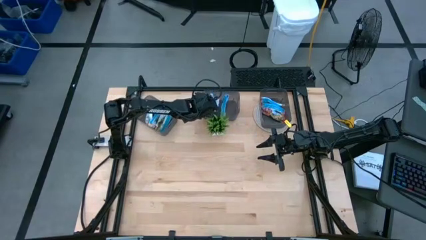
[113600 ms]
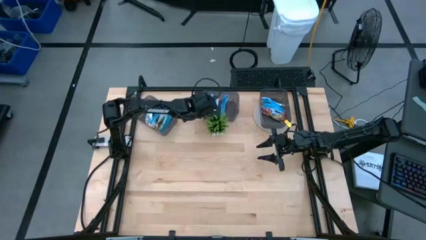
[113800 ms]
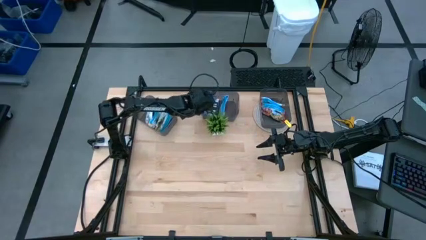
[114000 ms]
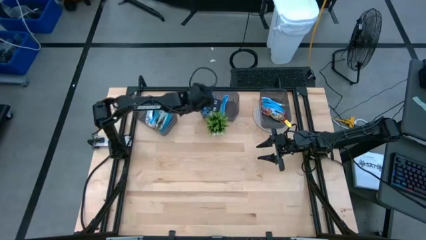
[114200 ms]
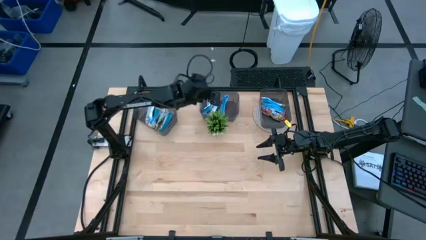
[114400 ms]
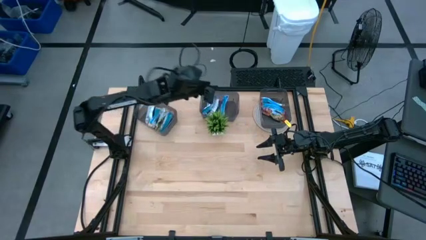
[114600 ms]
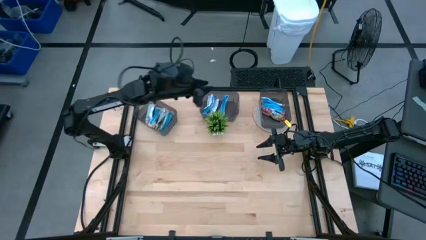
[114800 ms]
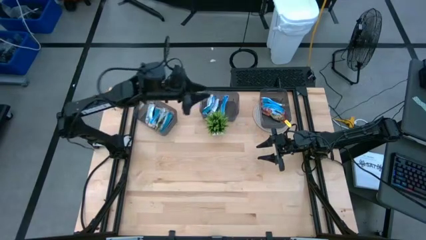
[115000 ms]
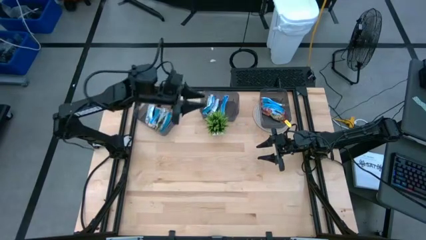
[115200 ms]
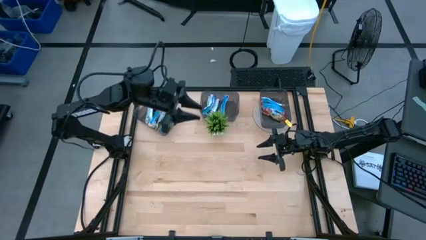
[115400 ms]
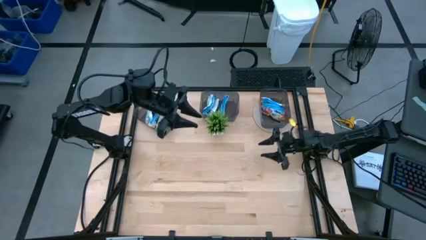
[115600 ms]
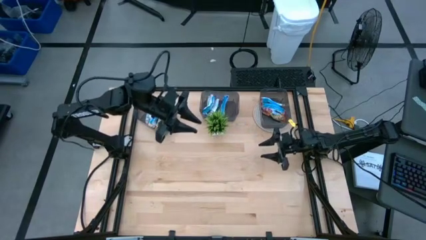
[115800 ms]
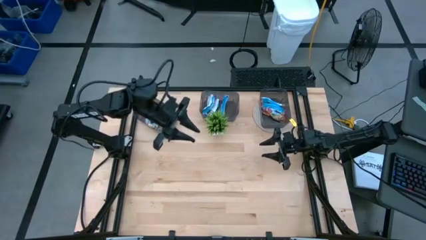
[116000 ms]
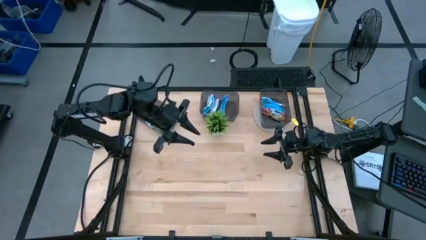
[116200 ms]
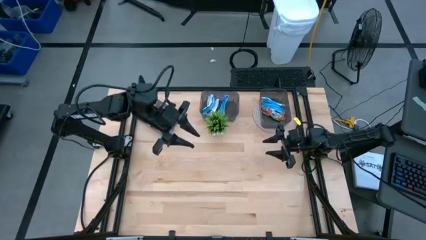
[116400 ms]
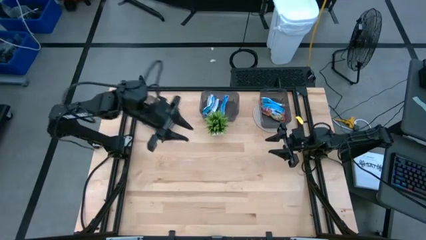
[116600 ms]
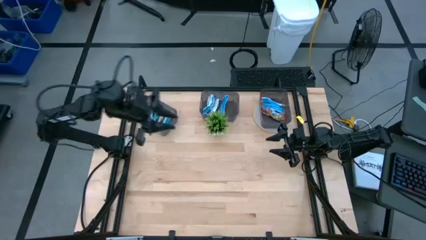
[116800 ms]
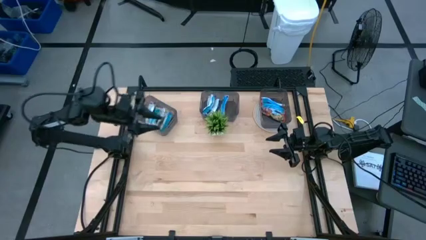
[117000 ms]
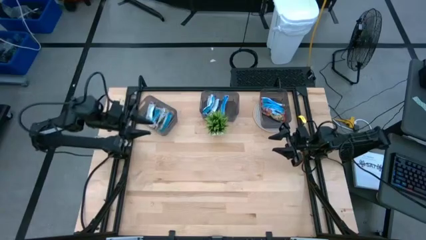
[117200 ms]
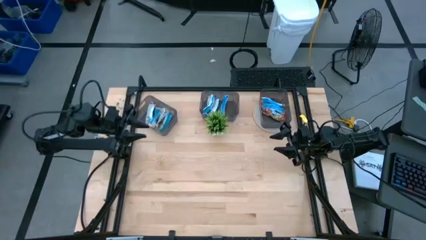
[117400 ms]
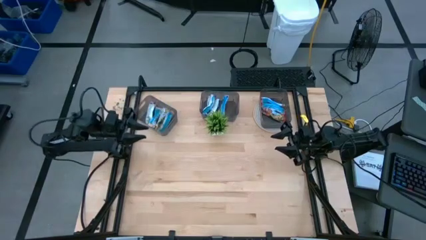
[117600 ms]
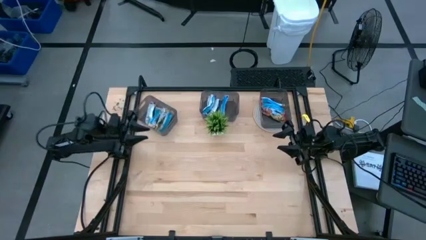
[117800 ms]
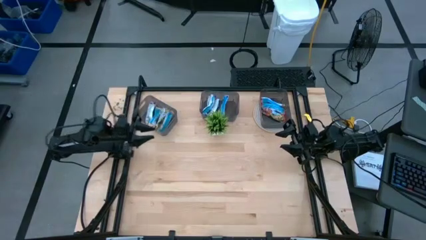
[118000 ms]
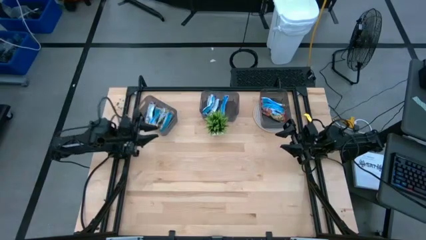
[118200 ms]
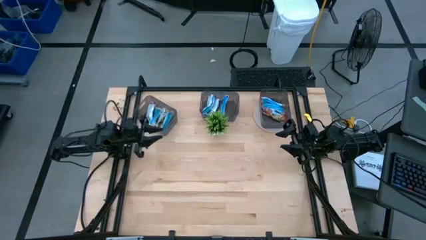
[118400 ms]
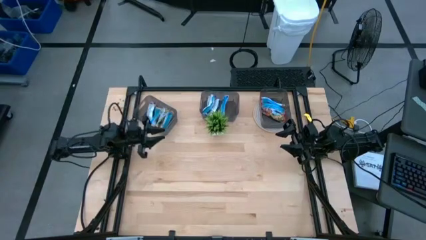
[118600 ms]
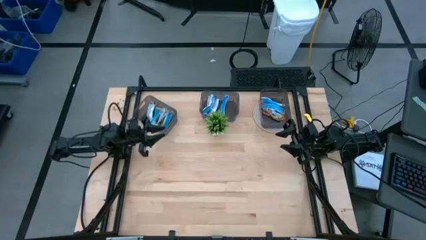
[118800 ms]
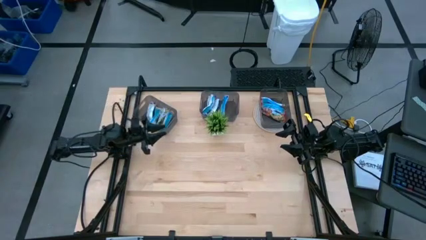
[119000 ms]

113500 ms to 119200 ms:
Task: Pick and place Granola Bars by type
Return to Home Position

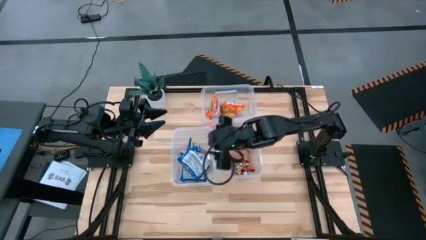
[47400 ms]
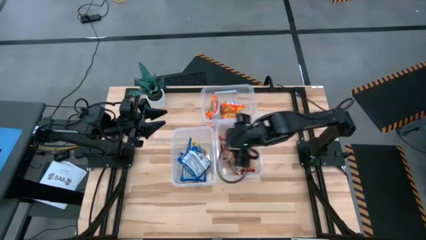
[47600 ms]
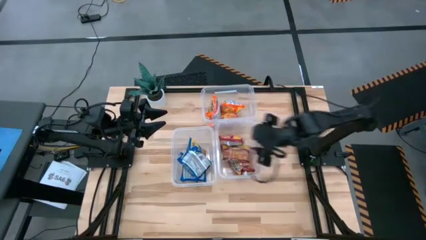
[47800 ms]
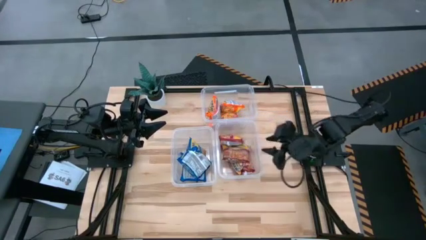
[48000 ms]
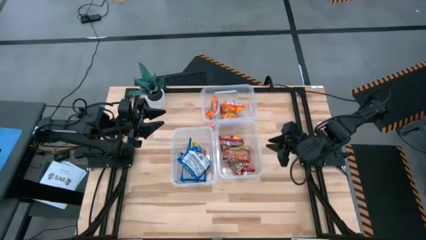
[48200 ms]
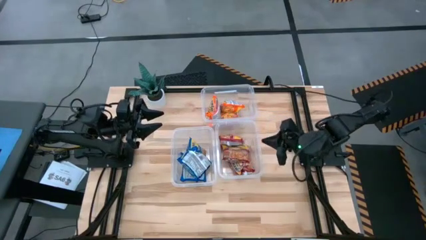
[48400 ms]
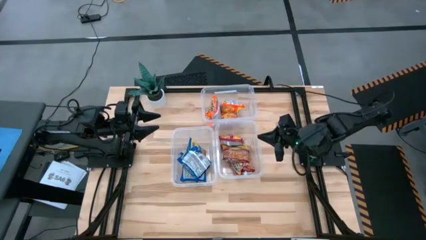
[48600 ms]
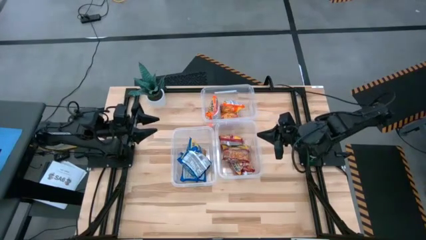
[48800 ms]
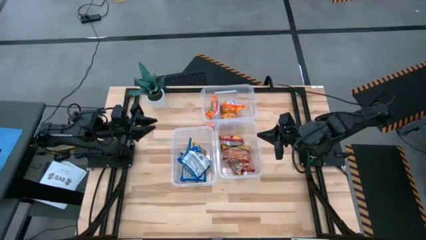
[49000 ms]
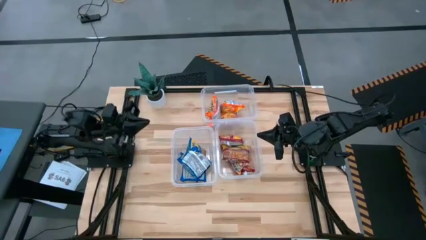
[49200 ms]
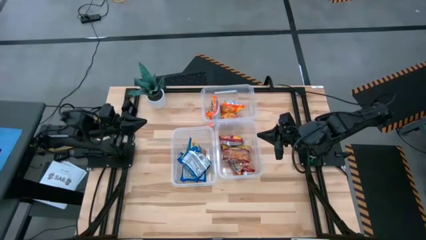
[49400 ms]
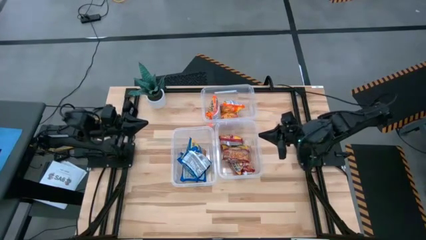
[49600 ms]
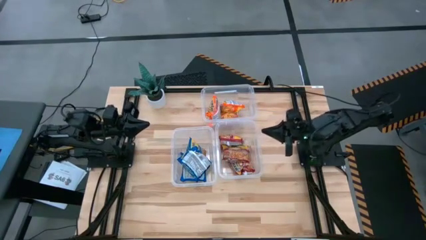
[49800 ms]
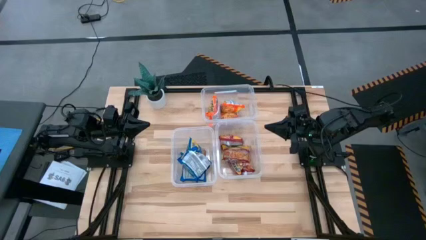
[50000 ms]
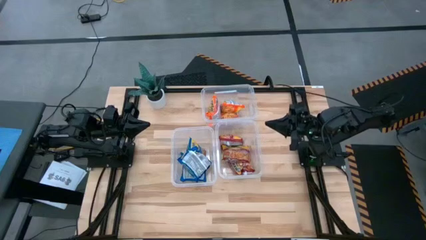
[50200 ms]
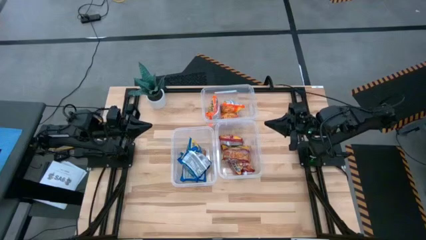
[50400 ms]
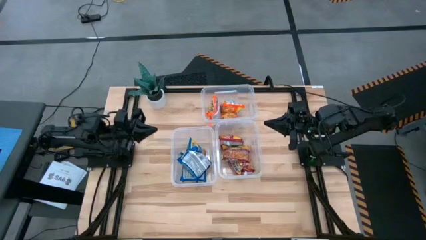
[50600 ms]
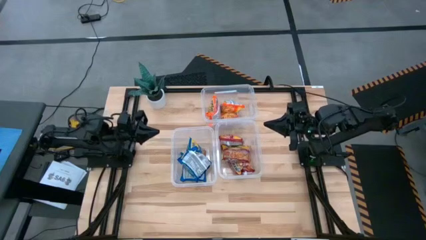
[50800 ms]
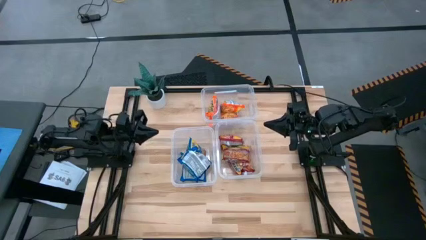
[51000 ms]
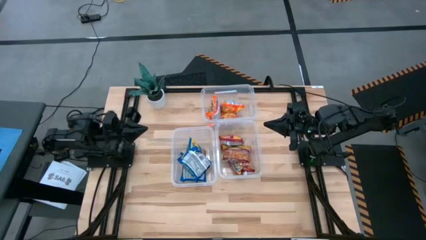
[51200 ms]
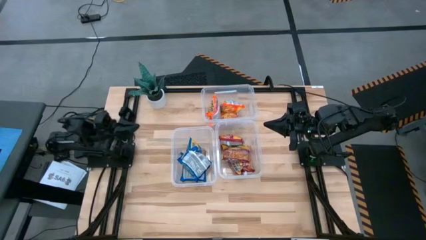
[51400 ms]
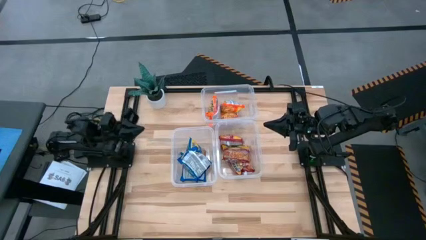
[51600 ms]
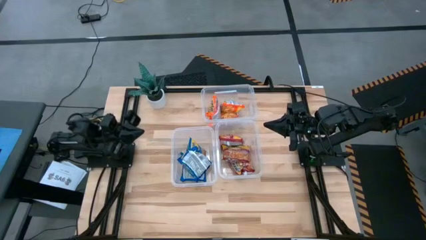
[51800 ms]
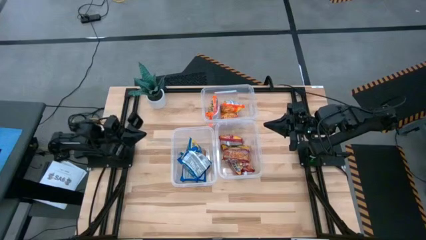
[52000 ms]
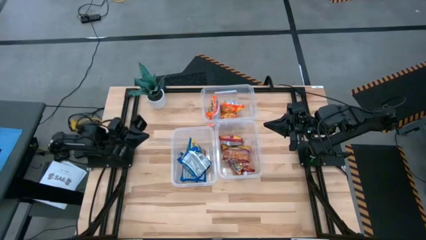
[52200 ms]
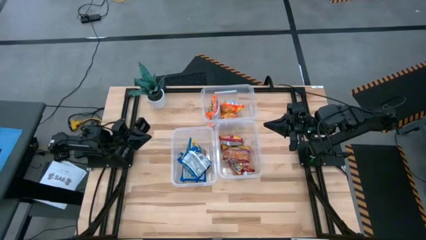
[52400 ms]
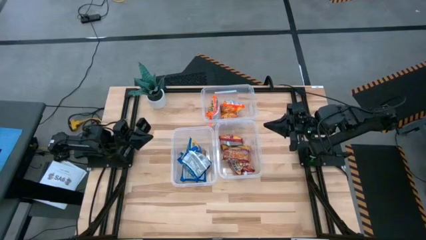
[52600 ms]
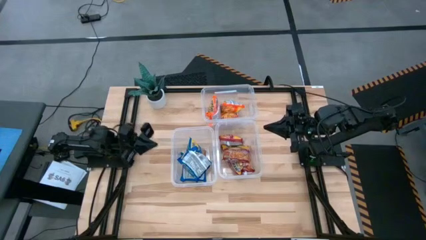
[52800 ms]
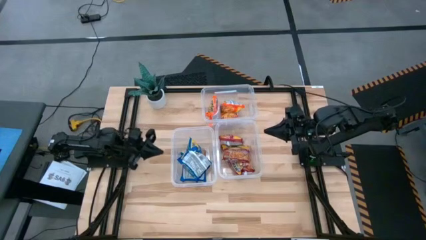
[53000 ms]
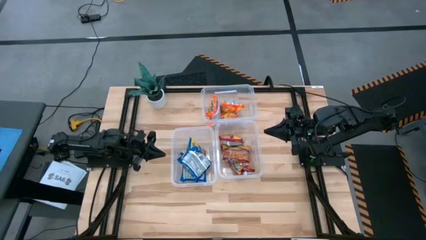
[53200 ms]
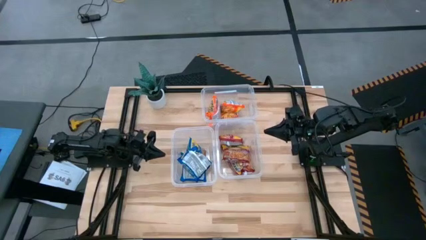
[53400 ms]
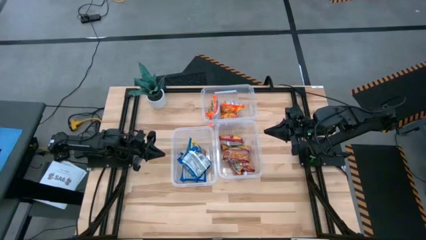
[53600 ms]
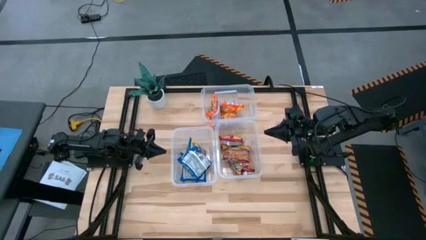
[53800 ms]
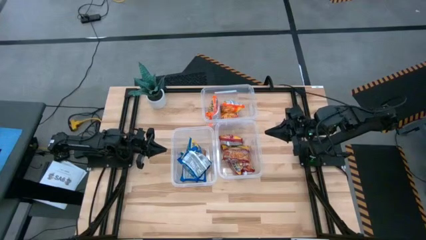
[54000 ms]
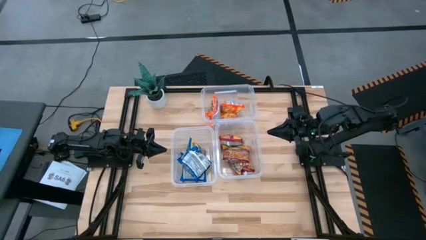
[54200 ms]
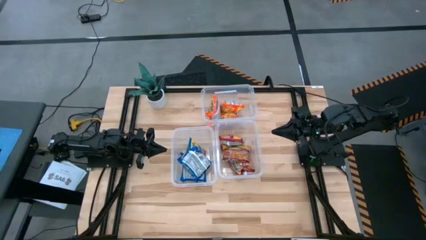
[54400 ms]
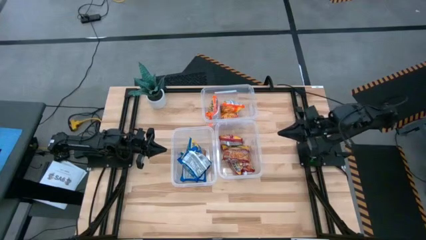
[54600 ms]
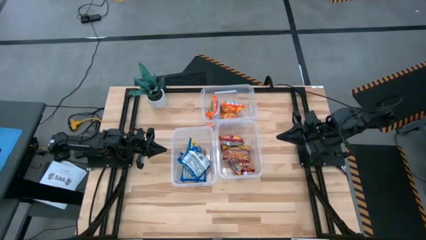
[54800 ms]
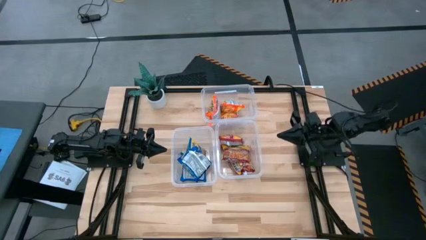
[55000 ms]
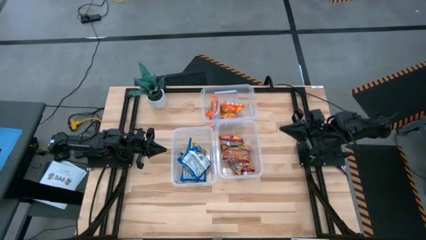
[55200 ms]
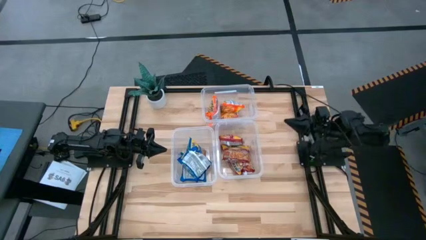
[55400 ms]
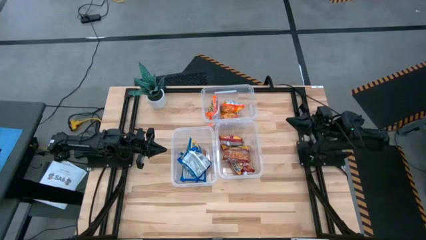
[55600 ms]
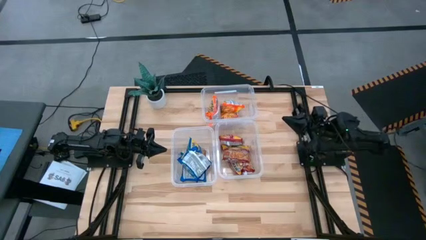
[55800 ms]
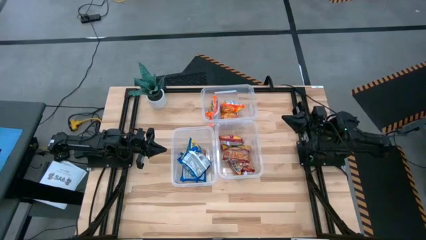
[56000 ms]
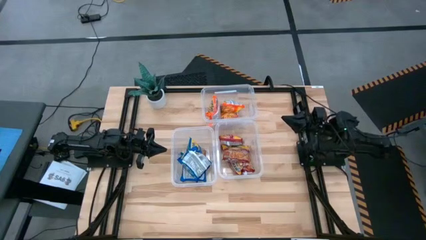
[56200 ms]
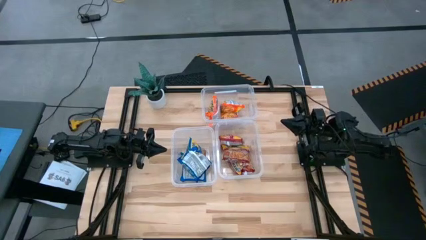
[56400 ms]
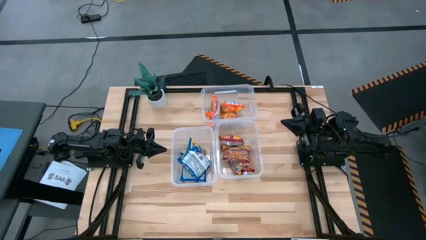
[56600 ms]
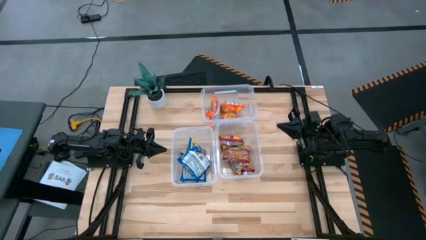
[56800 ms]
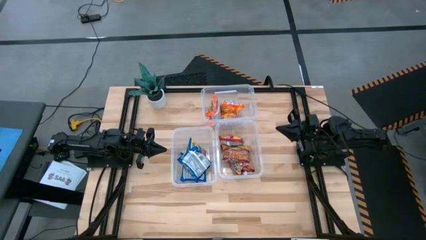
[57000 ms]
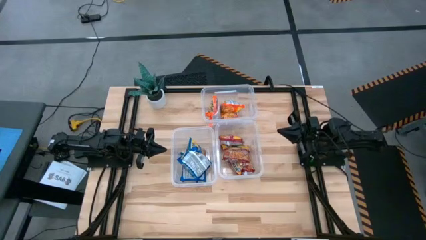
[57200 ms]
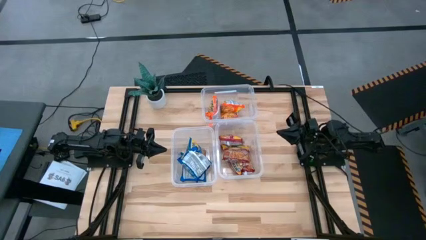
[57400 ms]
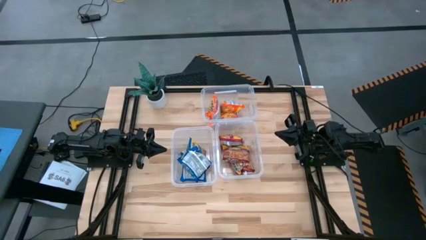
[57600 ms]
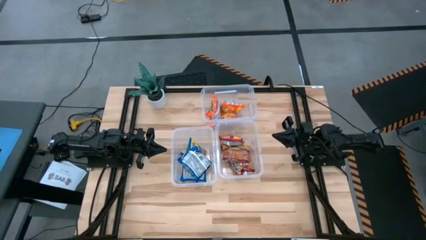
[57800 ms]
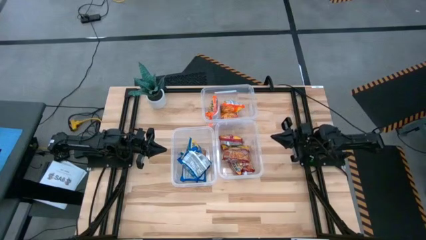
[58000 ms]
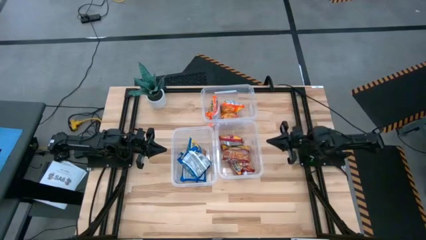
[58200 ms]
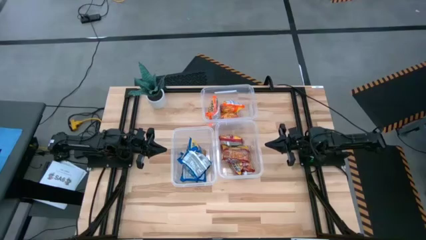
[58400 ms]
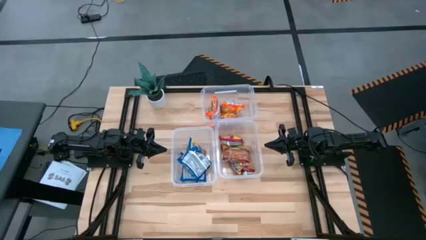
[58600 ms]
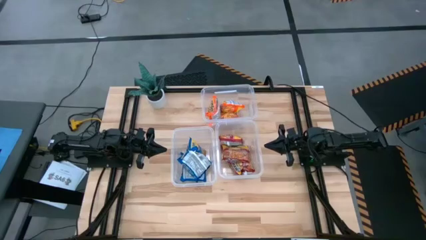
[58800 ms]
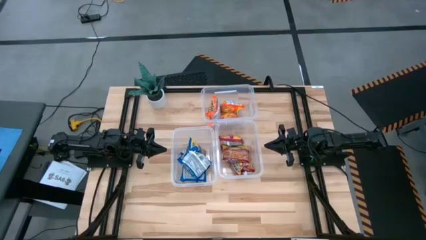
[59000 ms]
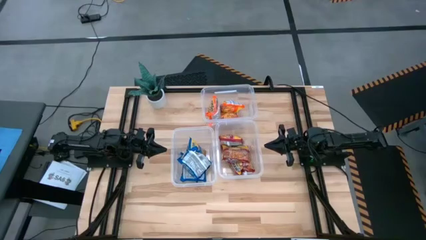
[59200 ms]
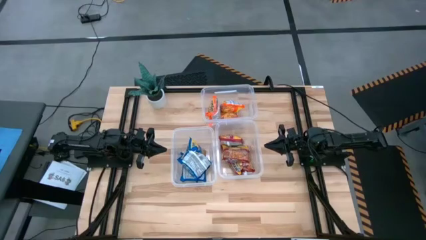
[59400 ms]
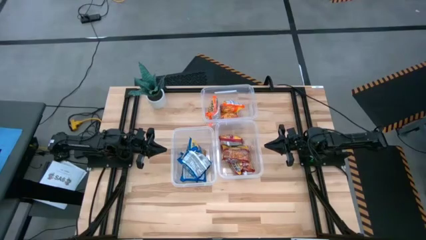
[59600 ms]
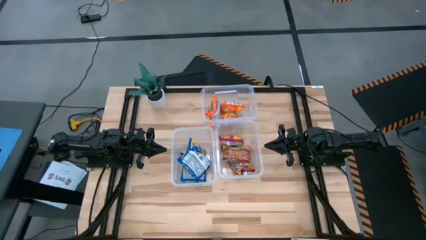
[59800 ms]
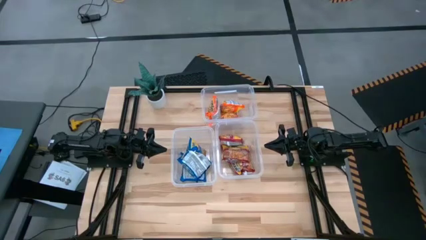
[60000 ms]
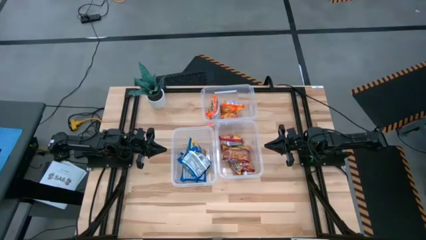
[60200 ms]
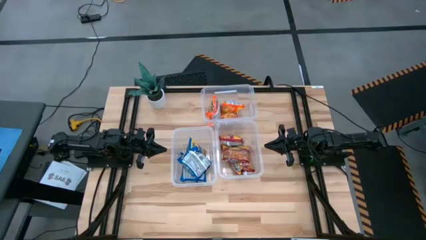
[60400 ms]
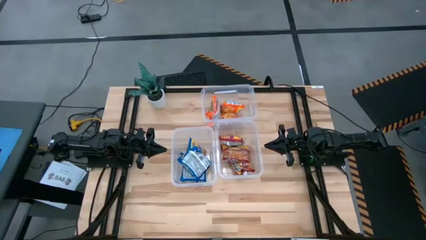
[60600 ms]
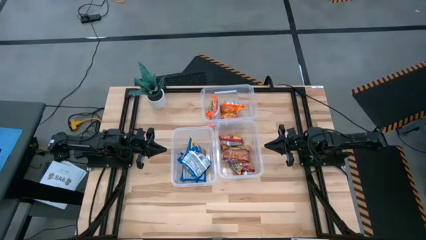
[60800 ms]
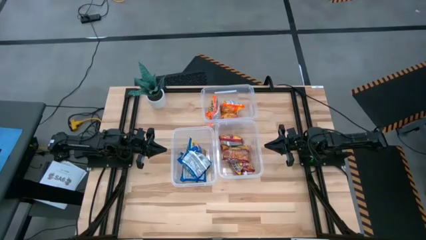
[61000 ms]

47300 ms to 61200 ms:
Task: Sort Maruchan noodles
Return to Home Position
